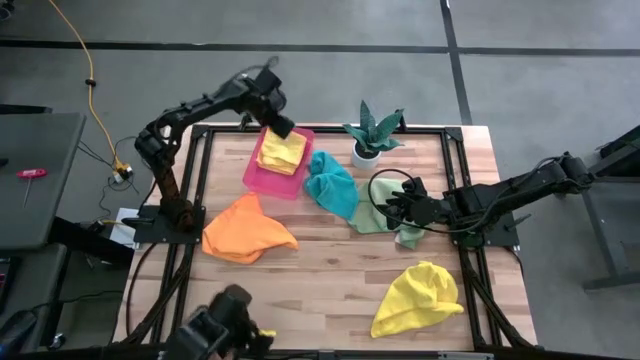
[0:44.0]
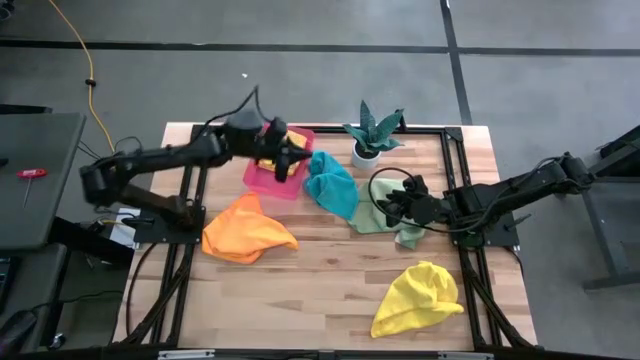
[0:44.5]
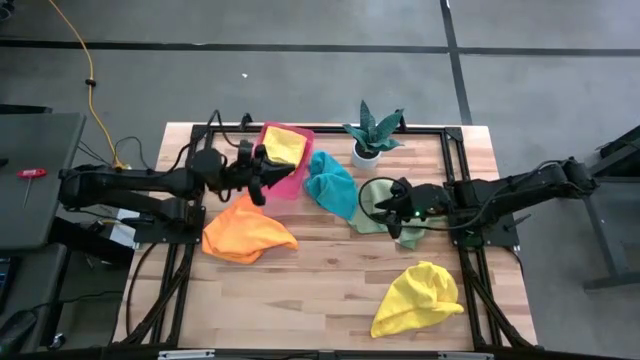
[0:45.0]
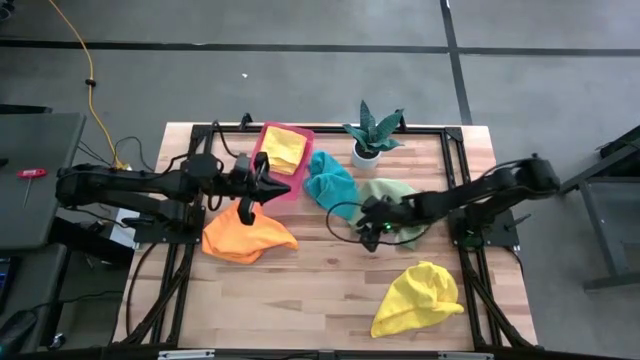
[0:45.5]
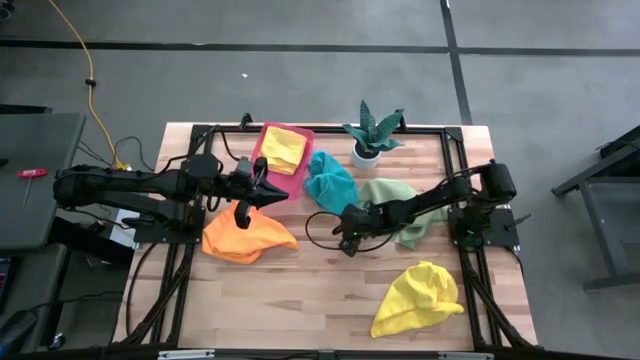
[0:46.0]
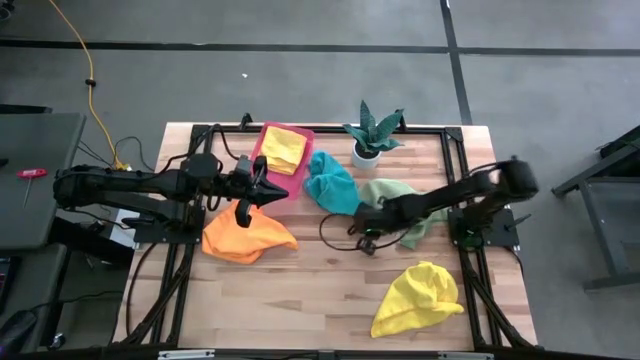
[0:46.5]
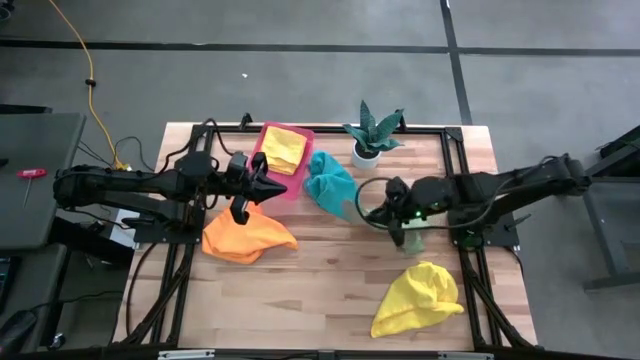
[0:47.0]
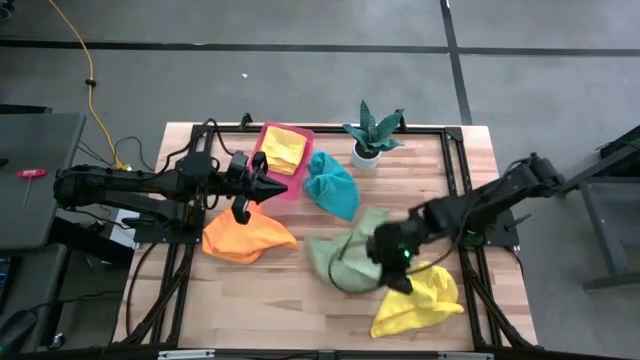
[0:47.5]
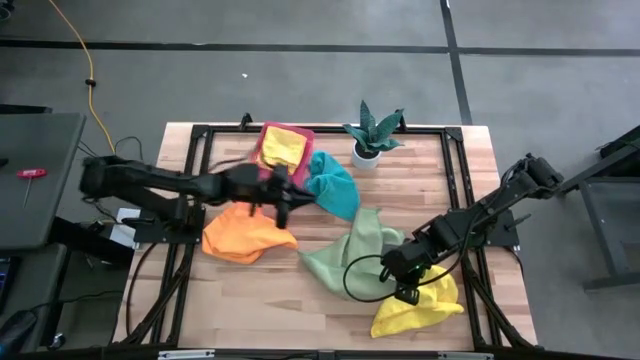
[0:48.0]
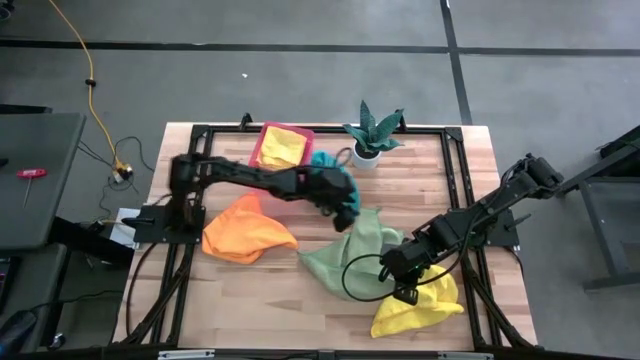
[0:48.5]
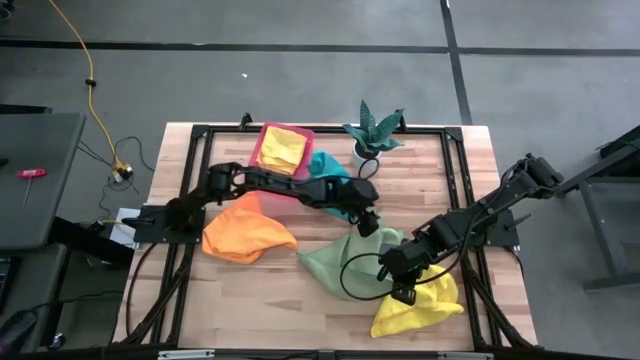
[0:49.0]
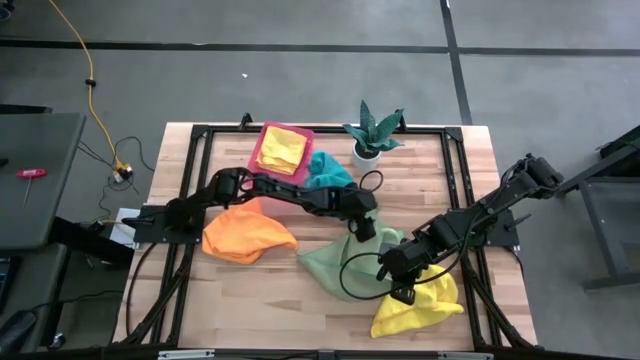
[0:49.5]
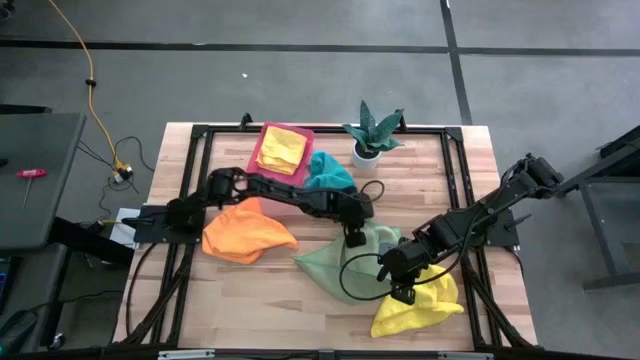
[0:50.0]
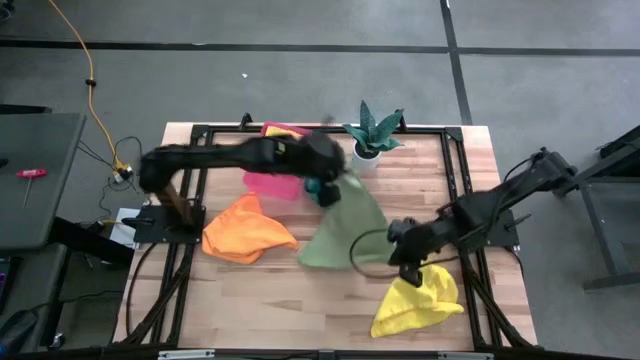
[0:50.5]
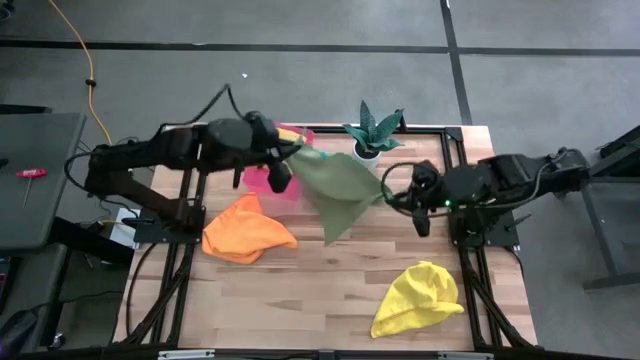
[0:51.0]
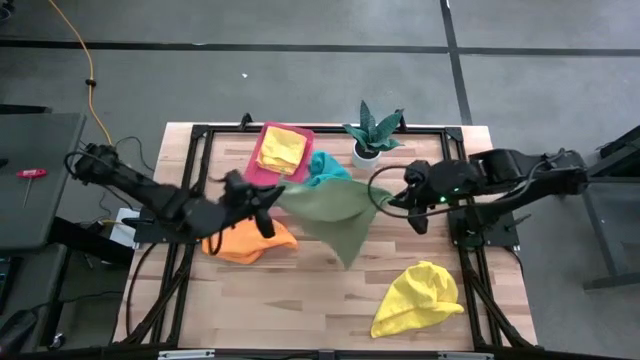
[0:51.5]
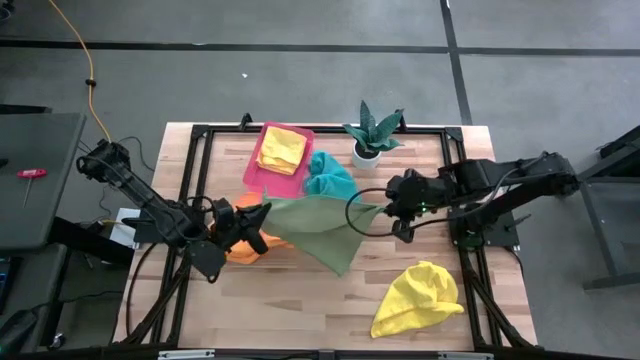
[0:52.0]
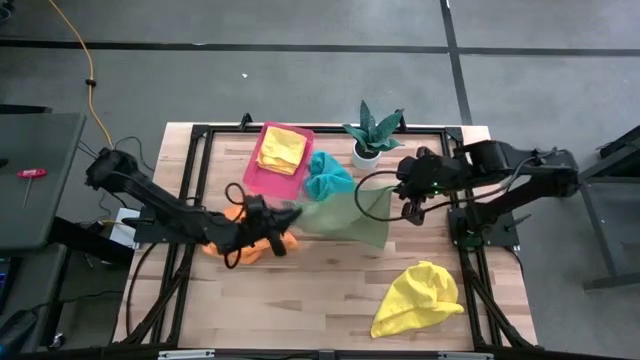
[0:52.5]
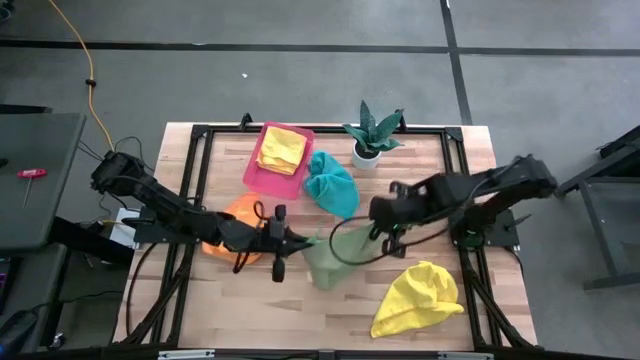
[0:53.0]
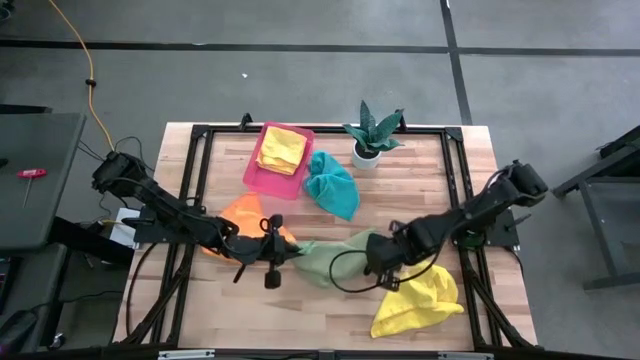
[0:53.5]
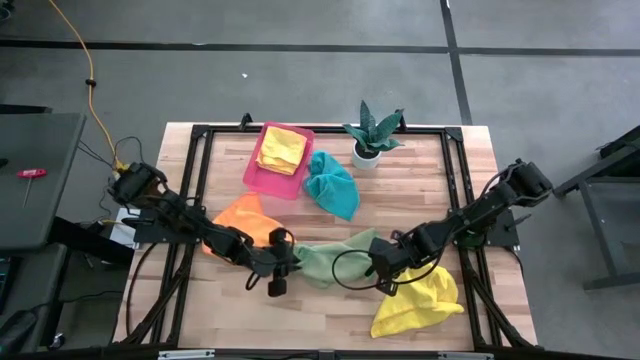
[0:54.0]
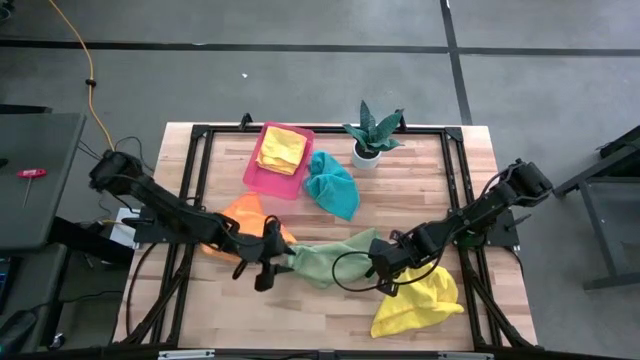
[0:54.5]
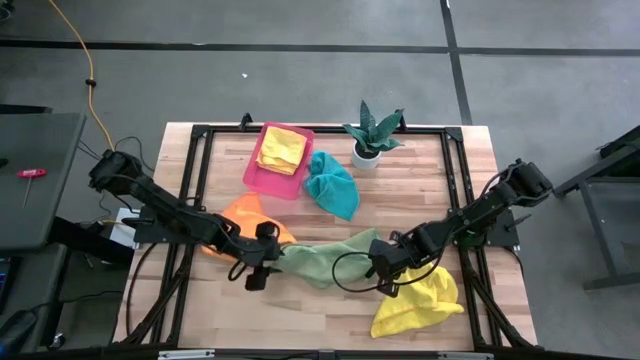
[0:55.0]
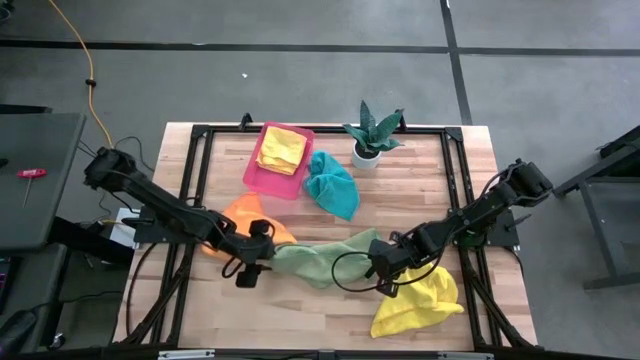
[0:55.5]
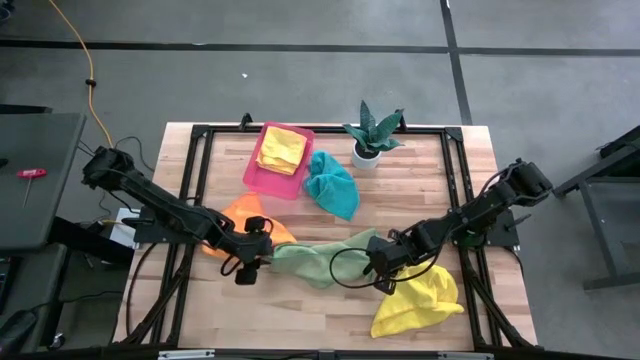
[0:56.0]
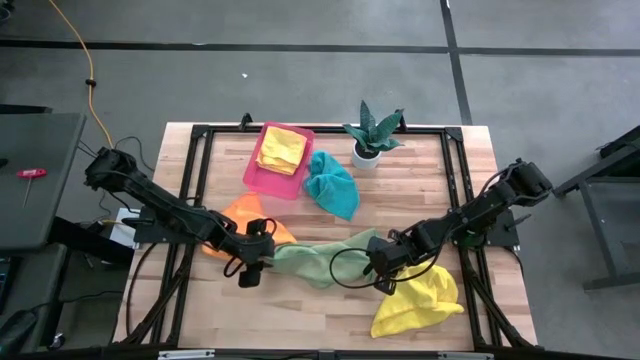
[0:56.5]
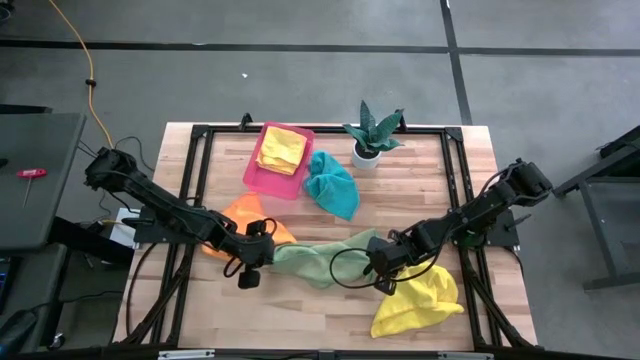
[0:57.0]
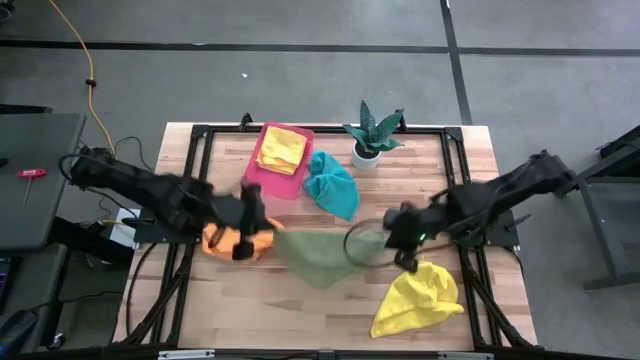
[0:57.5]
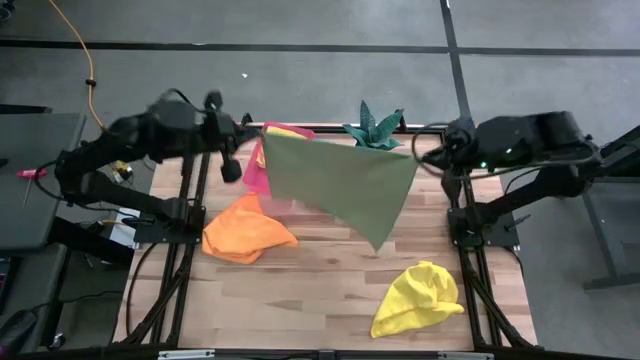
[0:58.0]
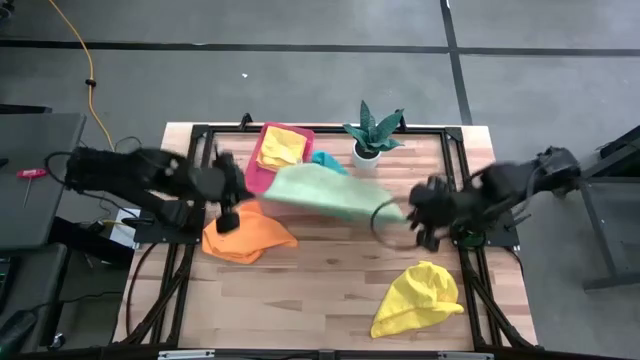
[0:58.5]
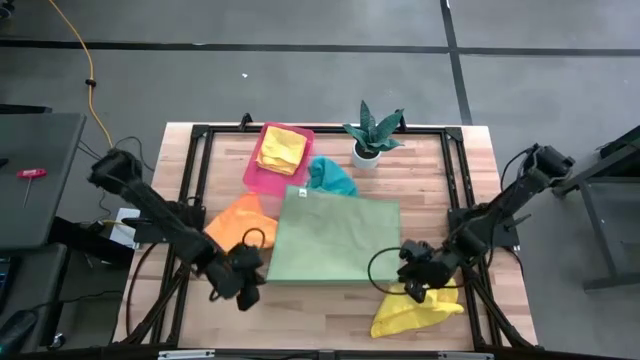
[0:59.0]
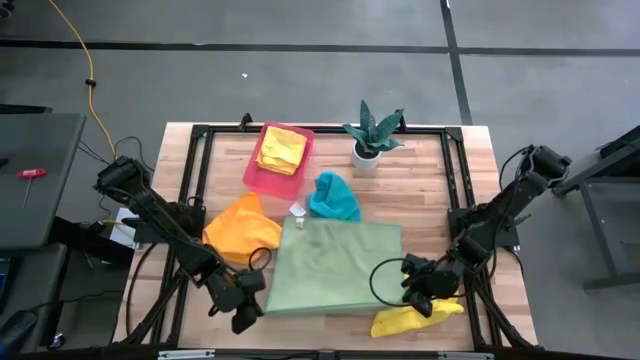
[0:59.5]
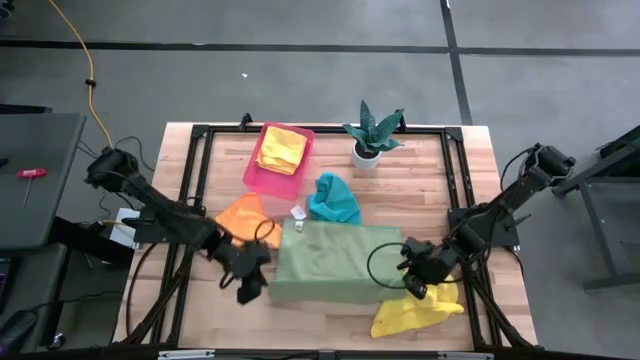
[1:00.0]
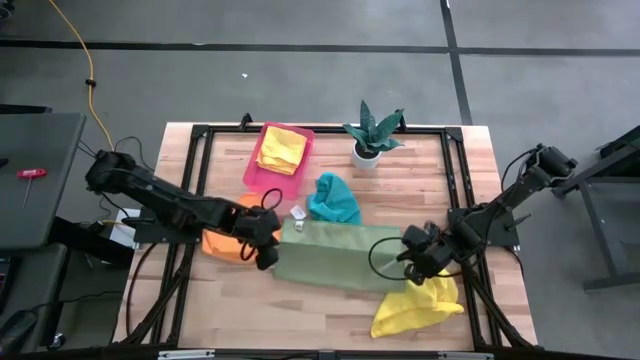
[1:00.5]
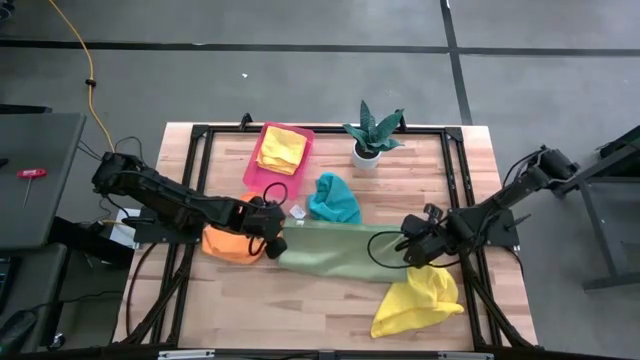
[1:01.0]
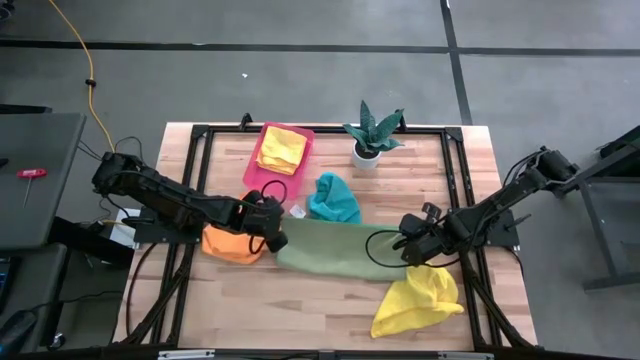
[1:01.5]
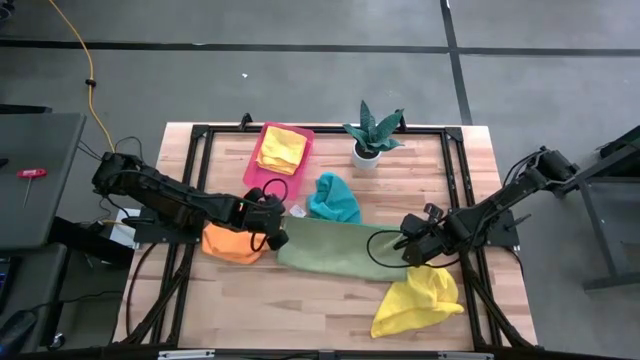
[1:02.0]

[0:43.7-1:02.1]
Task: Fold microfiber towels
Fold the green microfiber cloth

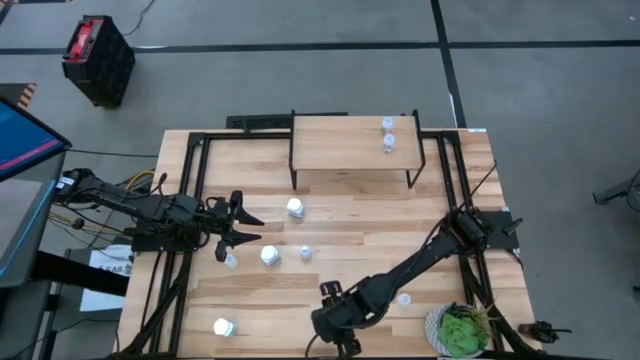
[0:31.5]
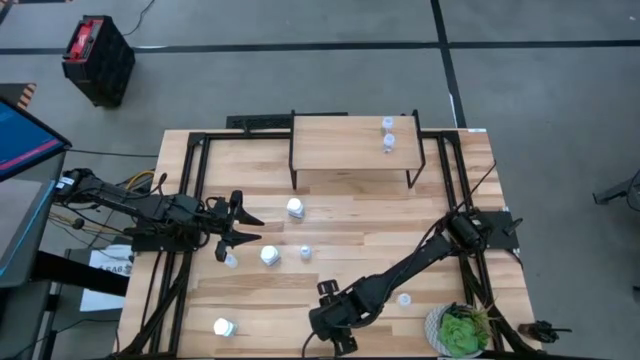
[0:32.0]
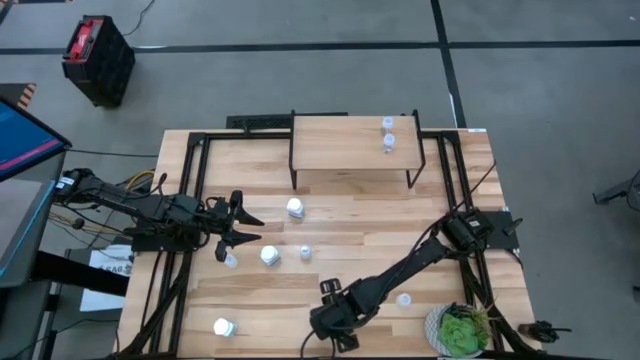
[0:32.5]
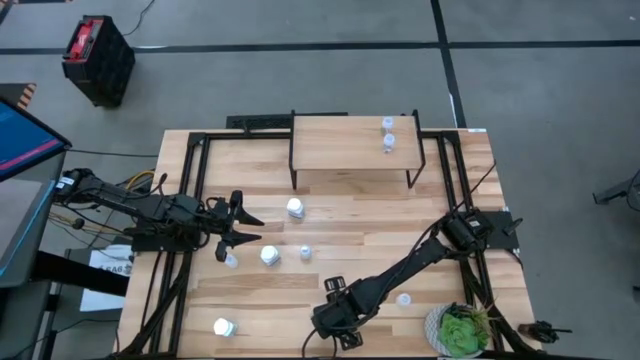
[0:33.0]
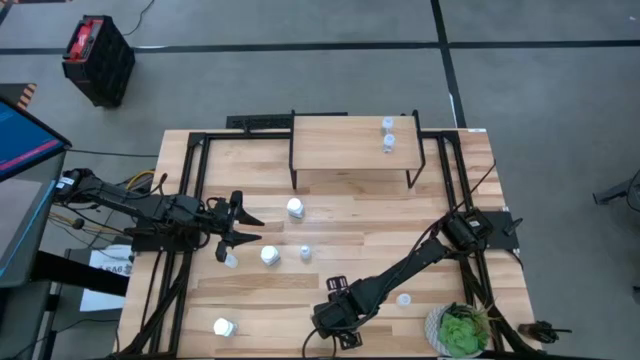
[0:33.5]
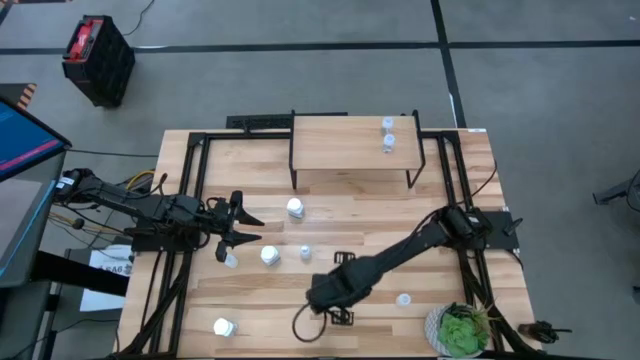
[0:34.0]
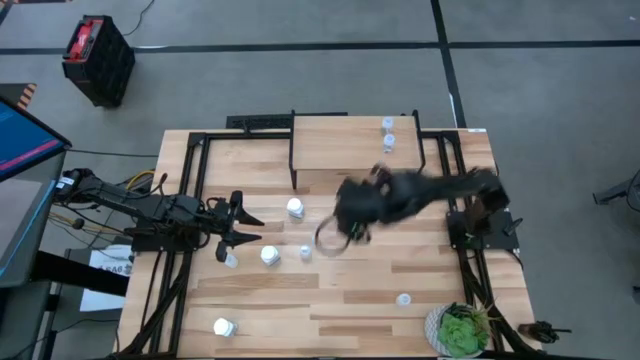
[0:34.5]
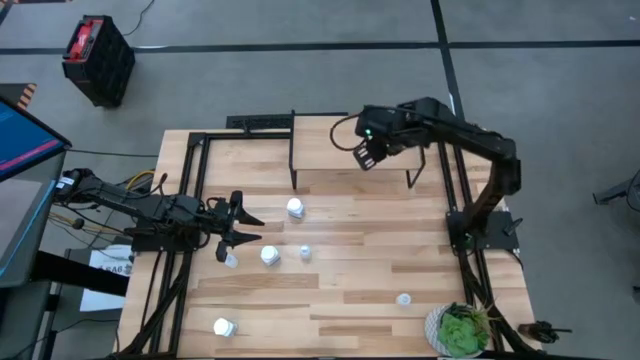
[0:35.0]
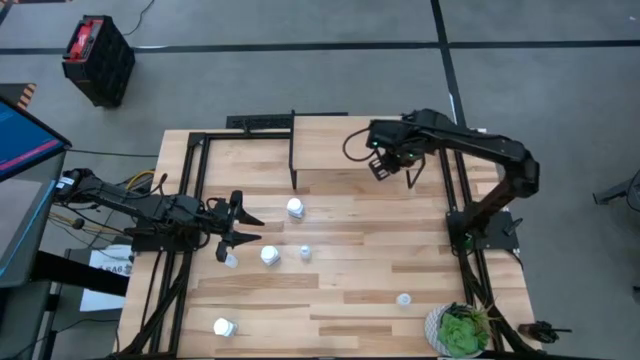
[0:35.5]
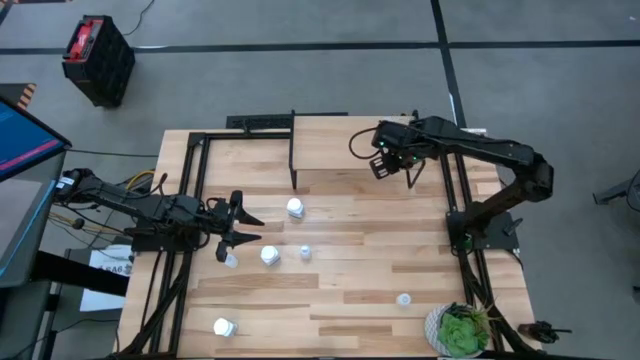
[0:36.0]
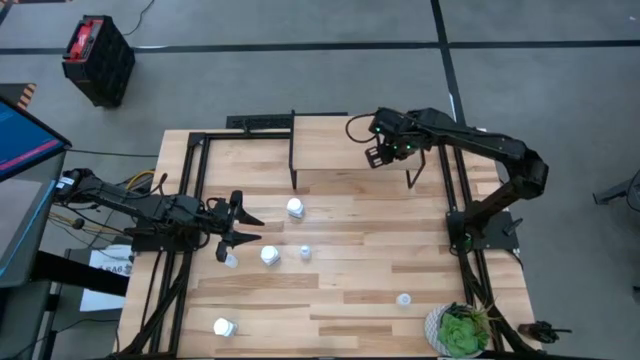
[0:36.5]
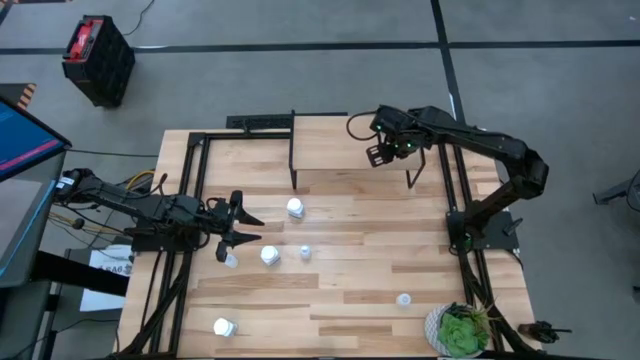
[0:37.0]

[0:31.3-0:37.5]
Task: Pick and place medicine bottles onto shelf by color
Put the transparent medicine bottle onto the right side of the shelf
